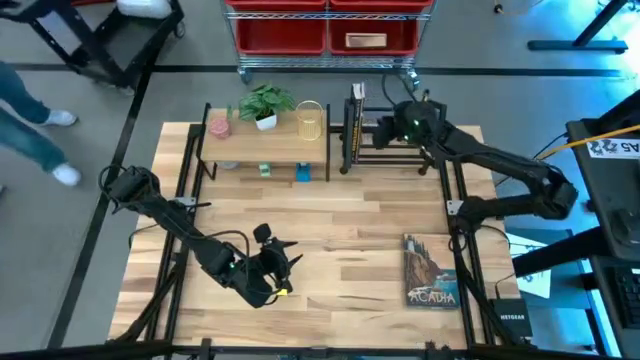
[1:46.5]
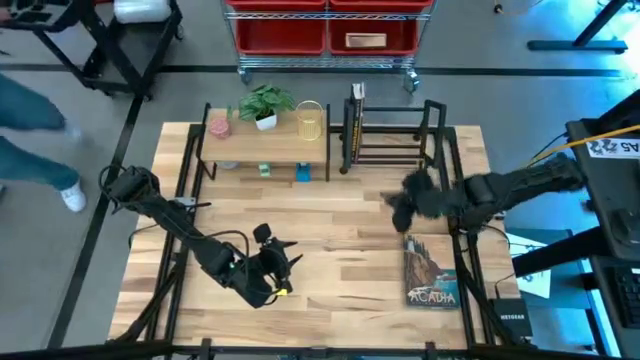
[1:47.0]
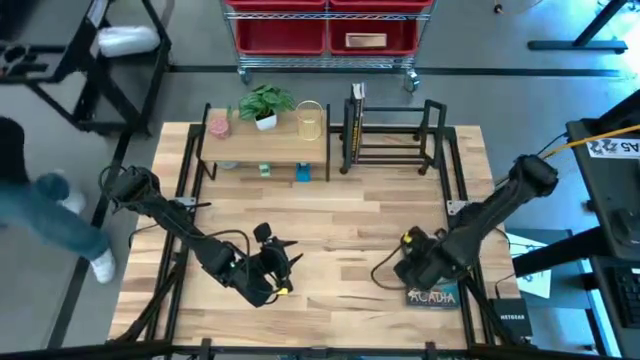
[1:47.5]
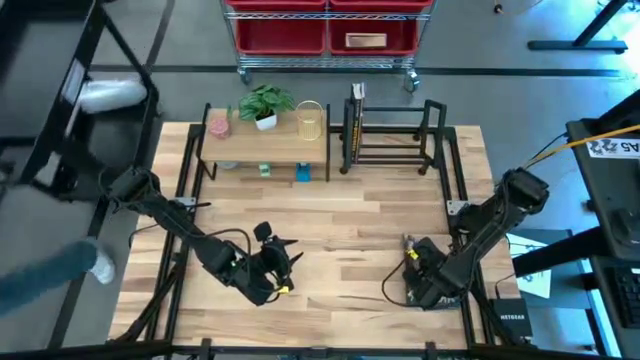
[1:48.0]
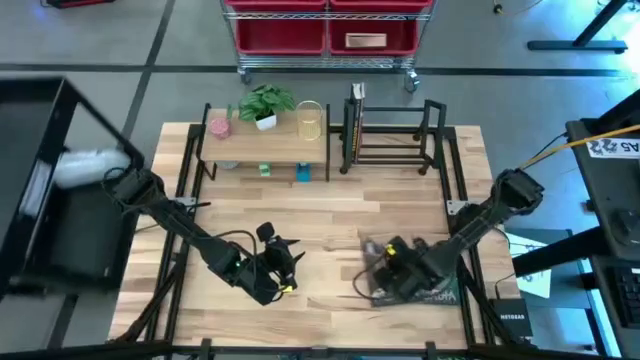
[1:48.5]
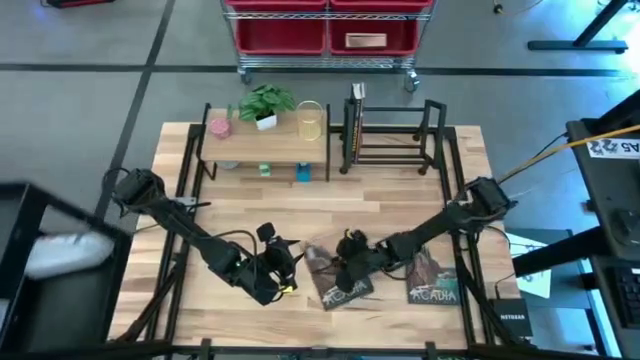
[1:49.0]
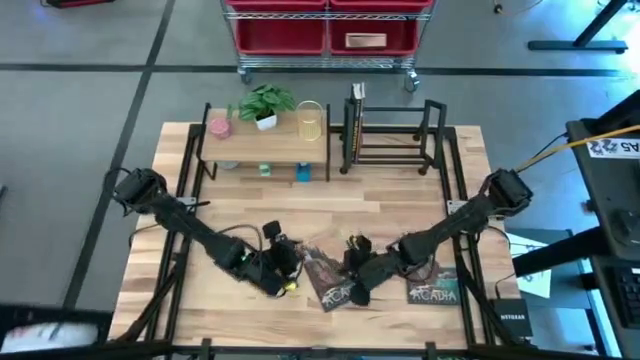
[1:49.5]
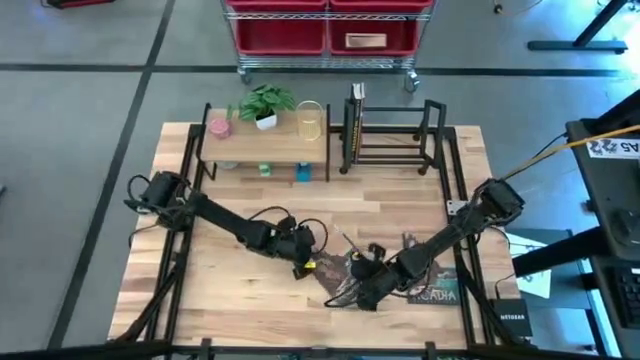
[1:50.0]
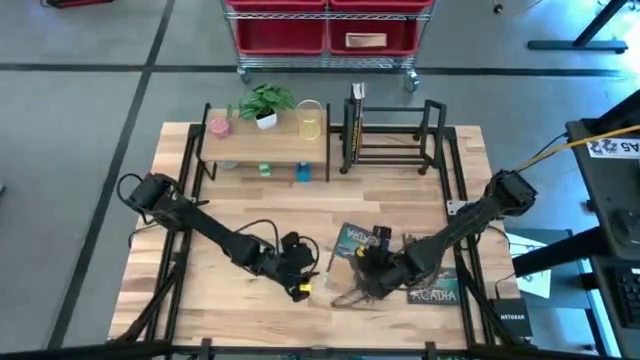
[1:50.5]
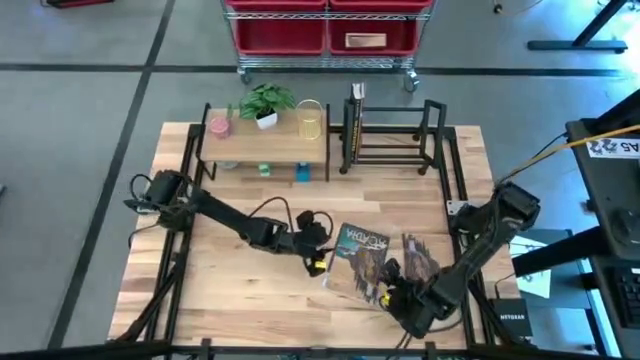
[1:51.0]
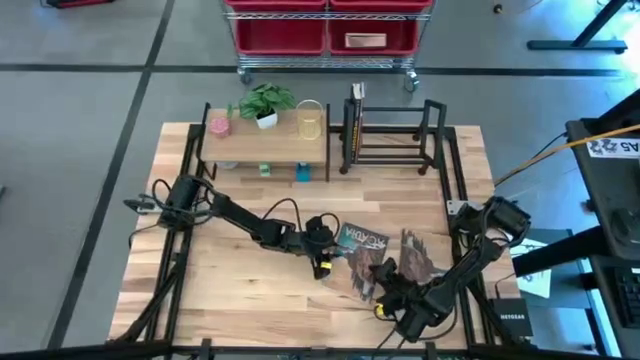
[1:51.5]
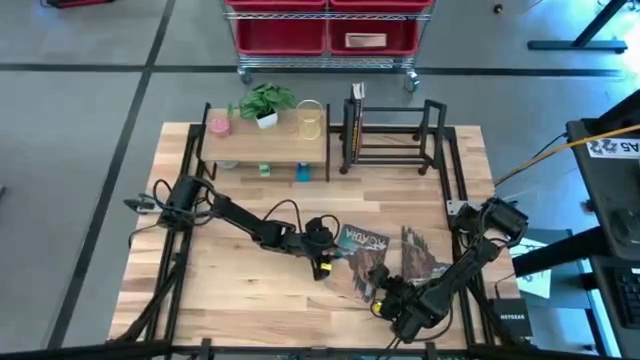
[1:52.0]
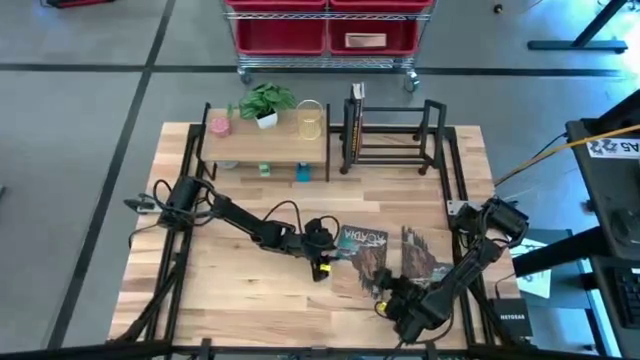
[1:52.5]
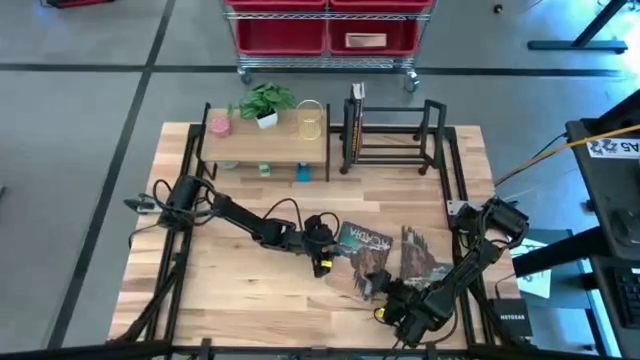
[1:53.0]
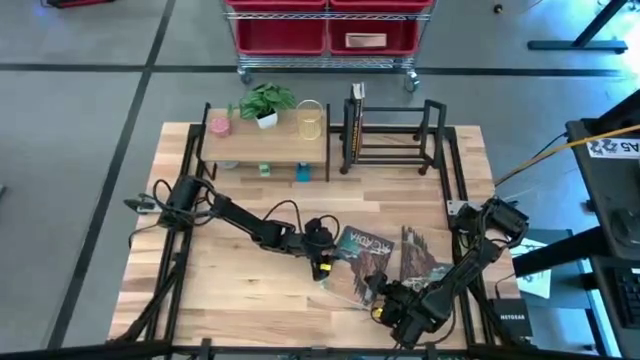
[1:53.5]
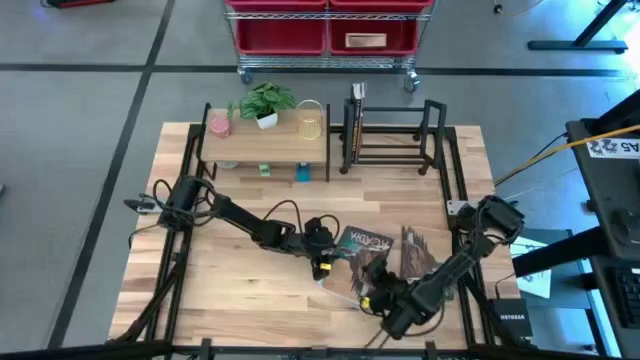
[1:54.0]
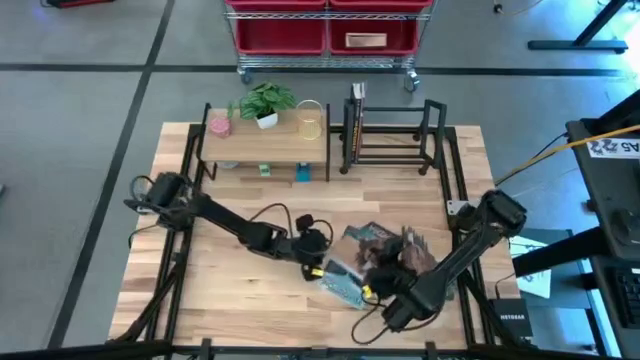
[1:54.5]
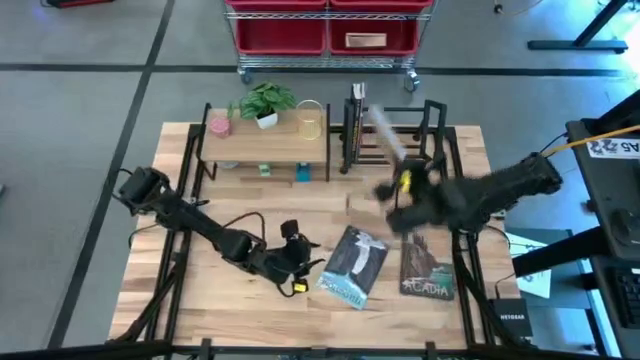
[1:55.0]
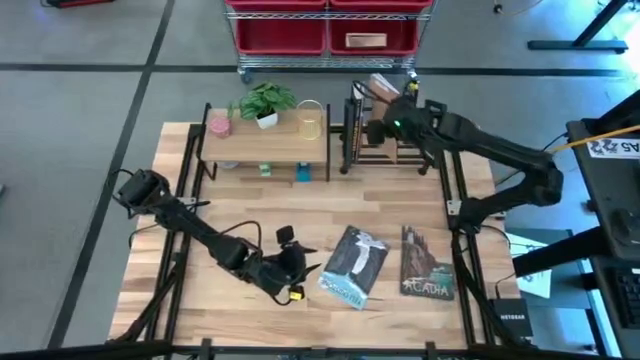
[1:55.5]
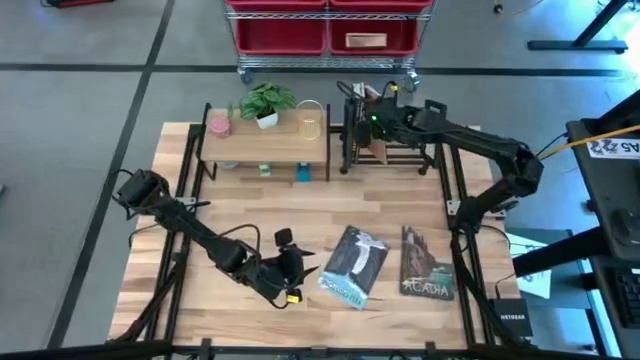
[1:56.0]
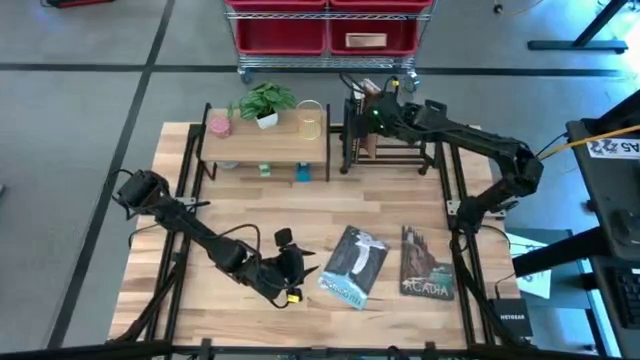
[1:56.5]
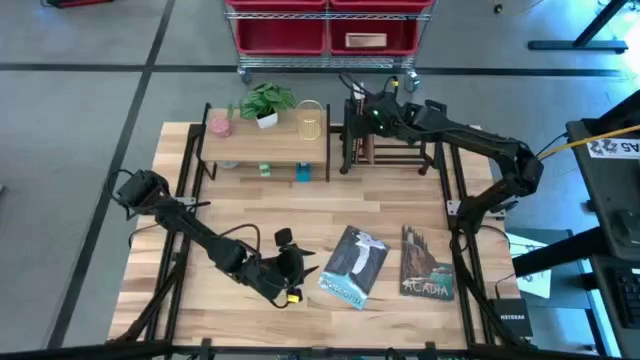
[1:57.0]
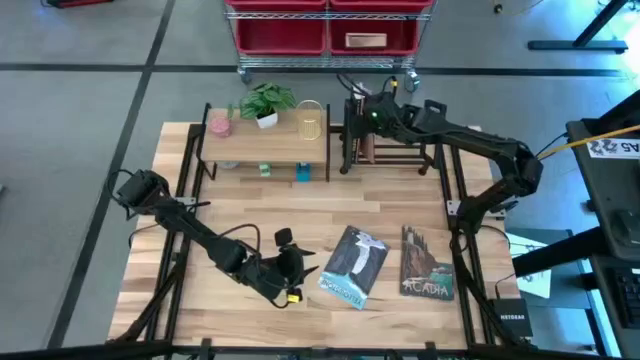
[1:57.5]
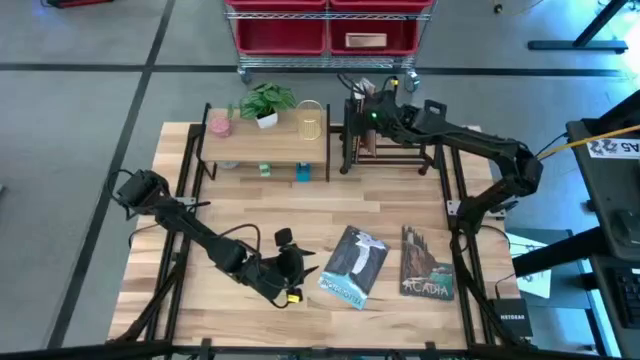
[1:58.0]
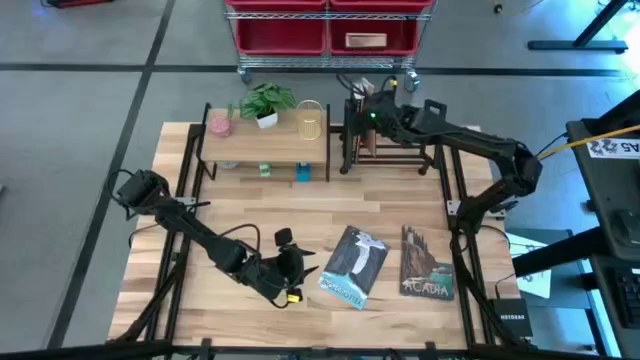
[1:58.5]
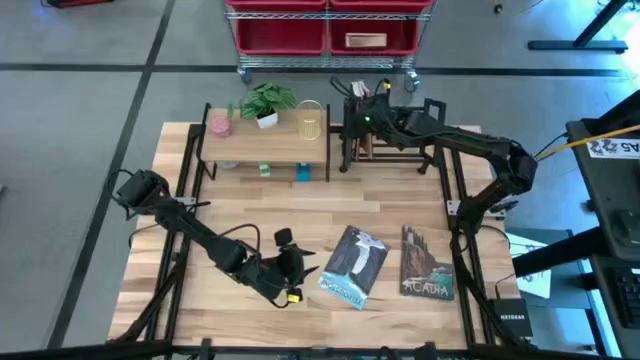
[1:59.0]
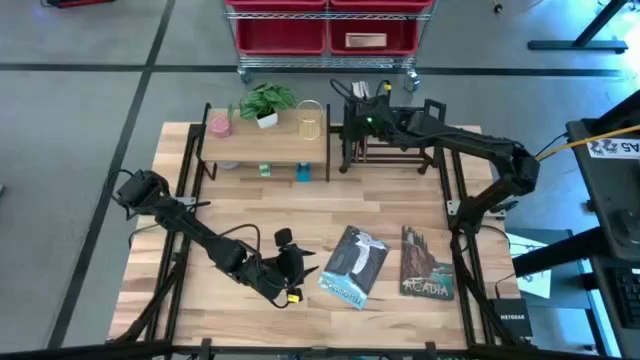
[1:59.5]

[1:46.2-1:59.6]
Task: Stock shelves
Put the brown blue book on the bookshelf

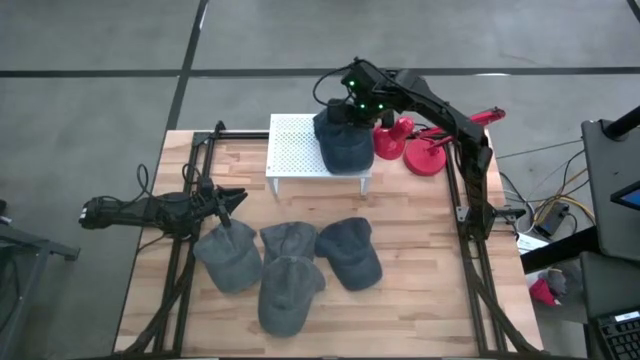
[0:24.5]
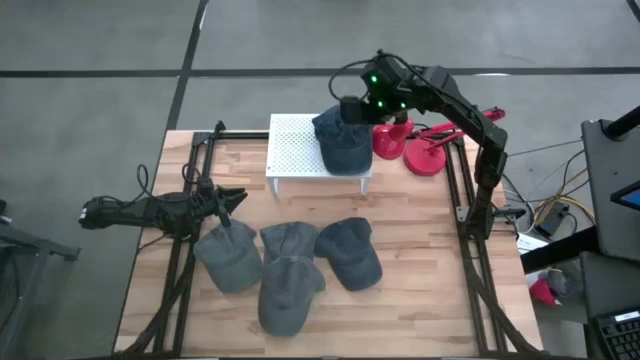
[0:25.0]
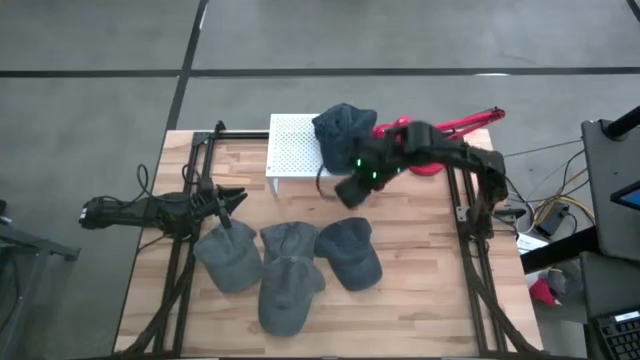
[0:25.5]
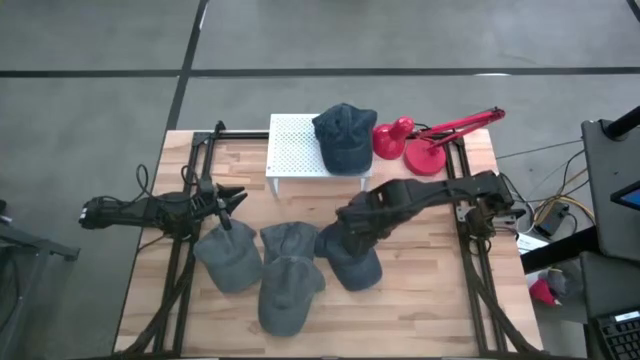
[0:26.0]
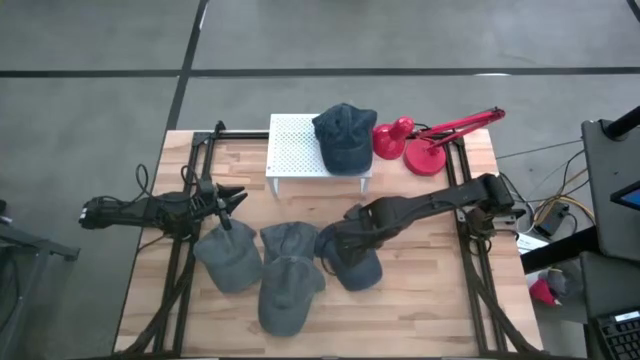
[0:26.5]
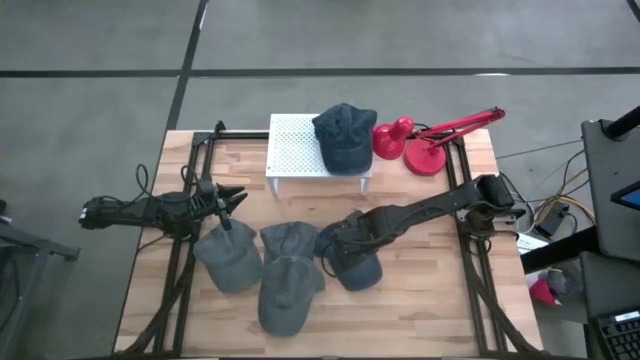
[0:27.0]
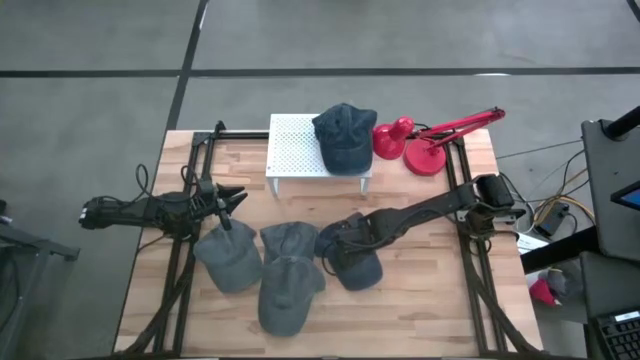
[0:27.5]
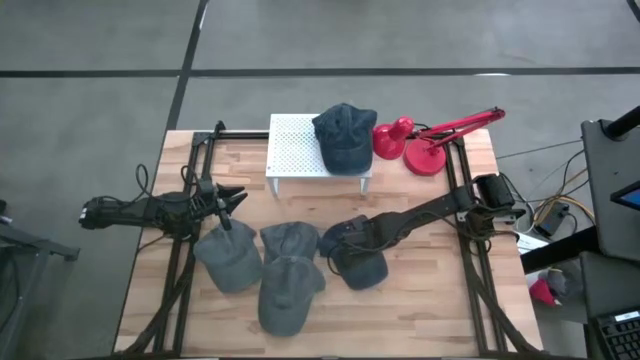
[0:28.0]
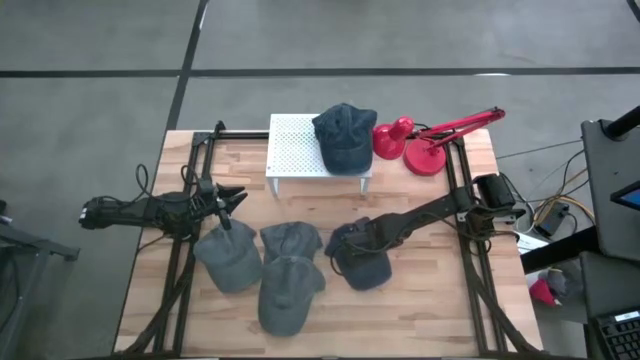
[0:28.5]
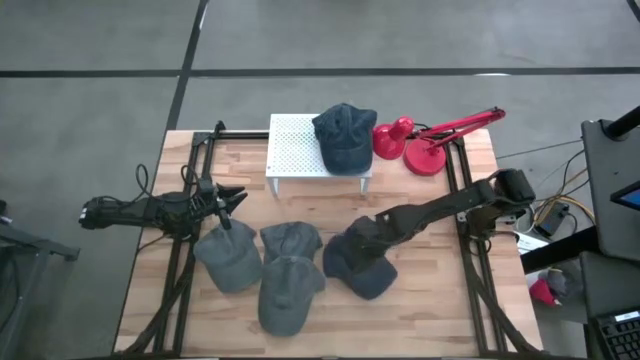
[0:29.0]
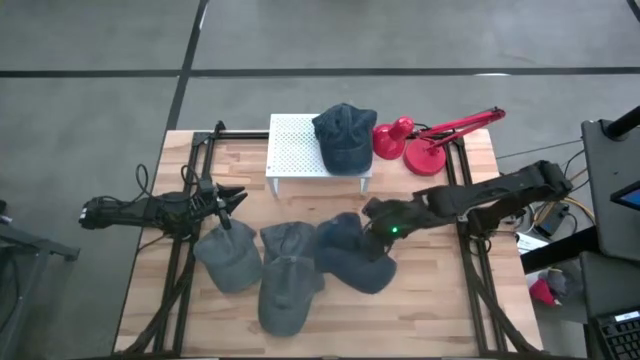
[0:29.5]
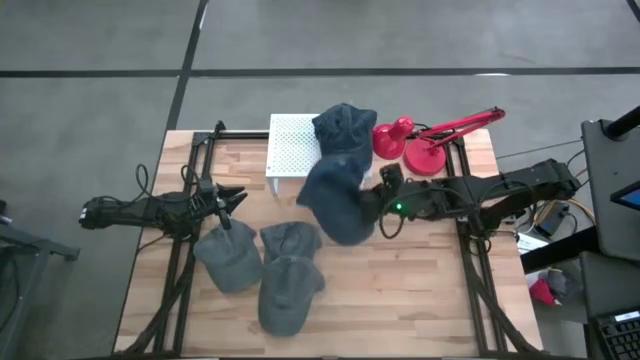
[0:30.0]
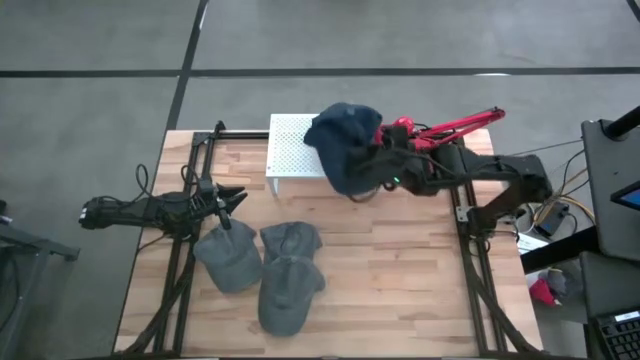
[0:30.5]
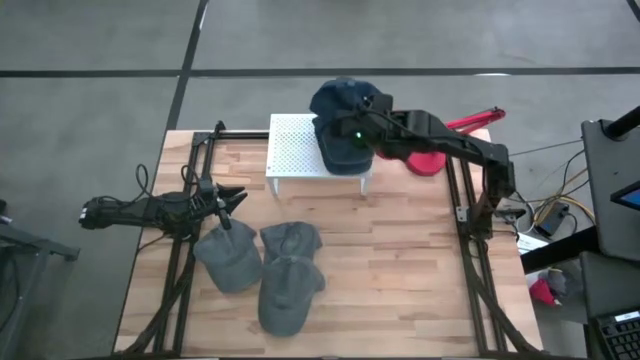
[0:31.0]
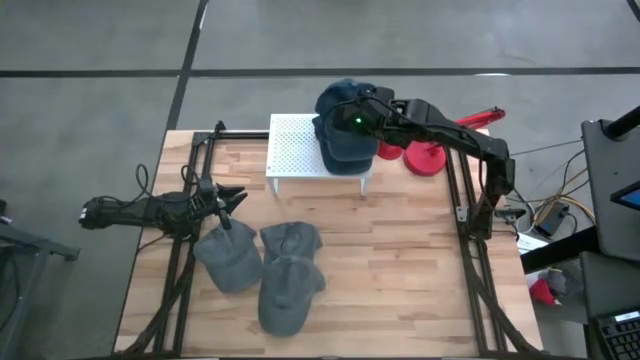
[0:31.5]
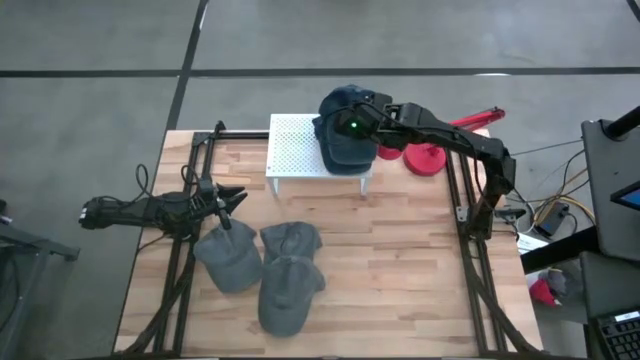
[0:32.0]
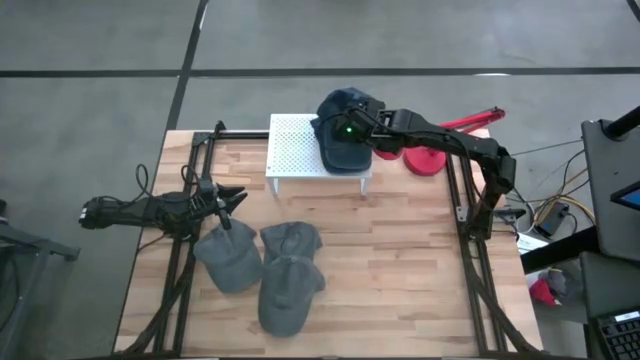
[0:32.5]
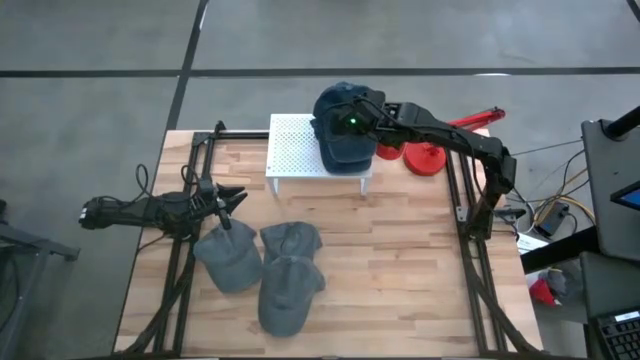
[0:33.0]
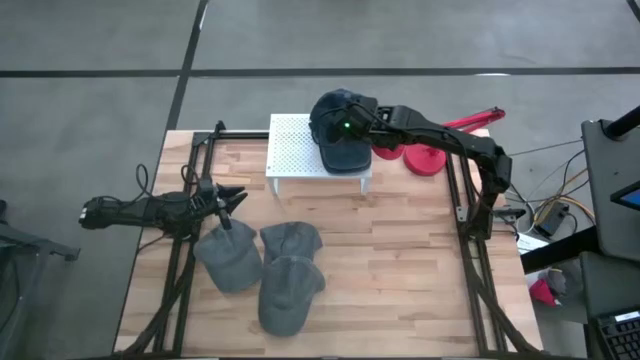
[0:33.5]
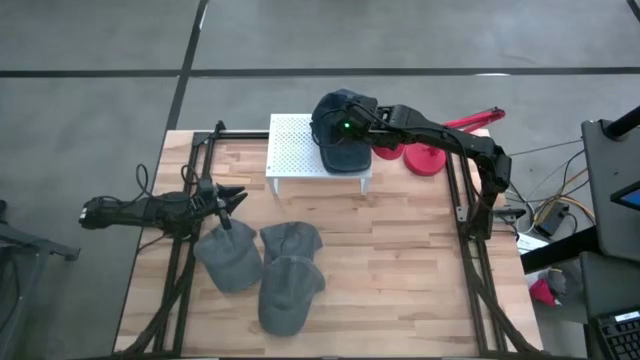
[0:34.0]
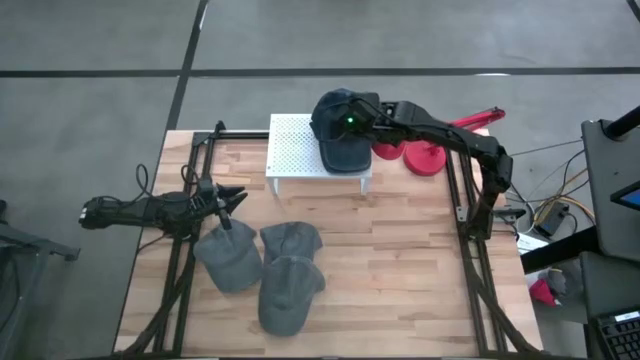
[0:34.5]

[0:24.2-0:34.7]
Task: Pick & Place hat
Stack the blue cap on the blue cap
